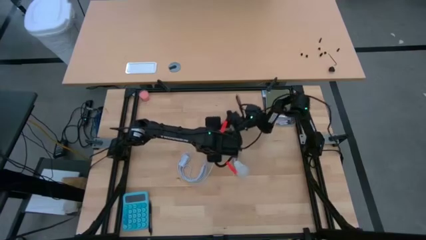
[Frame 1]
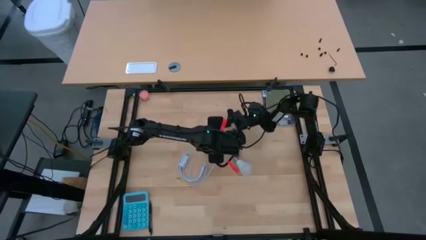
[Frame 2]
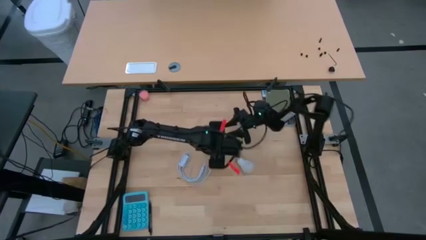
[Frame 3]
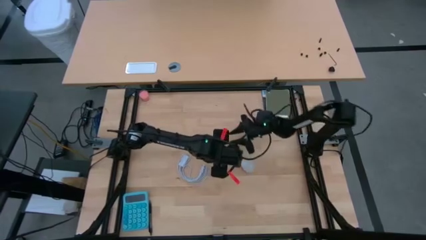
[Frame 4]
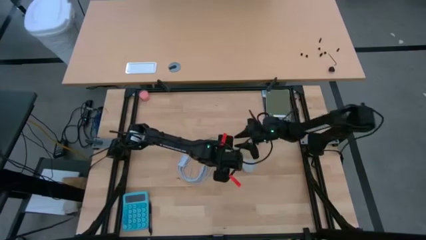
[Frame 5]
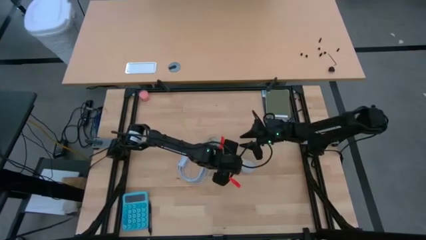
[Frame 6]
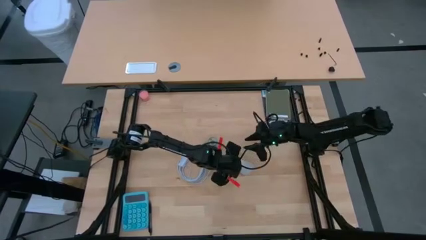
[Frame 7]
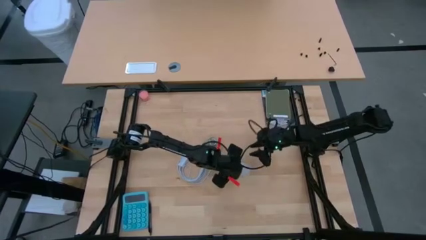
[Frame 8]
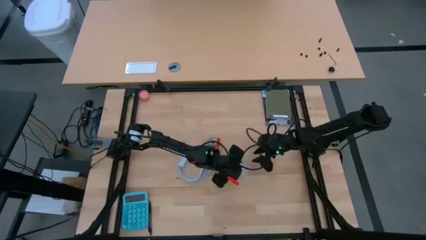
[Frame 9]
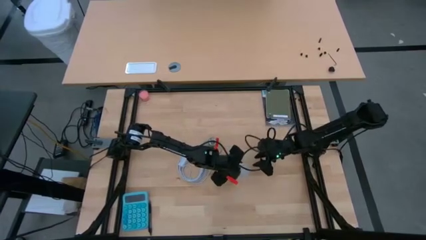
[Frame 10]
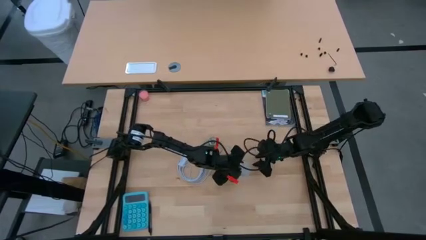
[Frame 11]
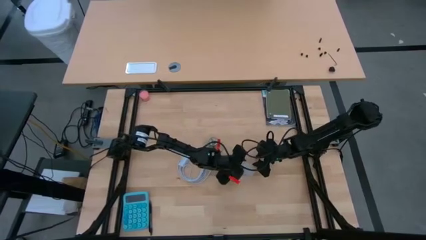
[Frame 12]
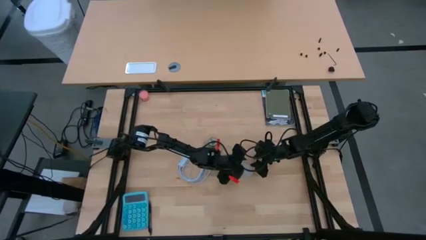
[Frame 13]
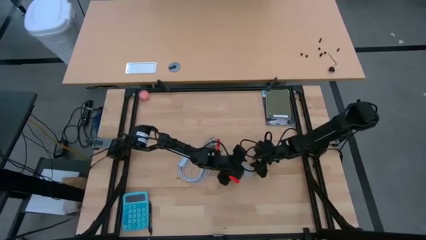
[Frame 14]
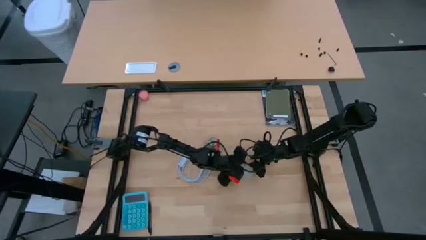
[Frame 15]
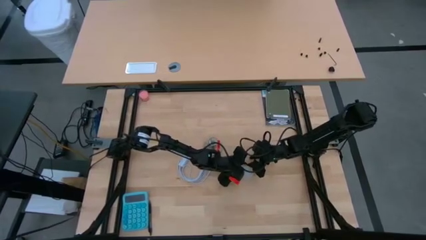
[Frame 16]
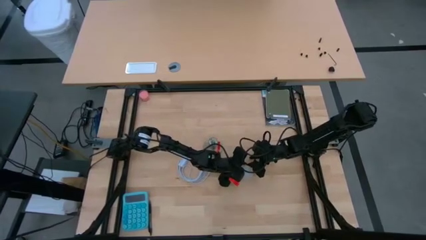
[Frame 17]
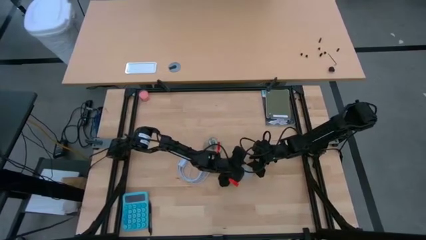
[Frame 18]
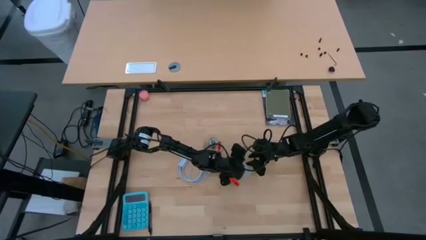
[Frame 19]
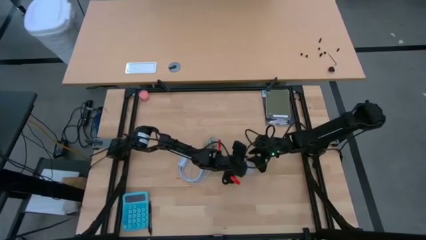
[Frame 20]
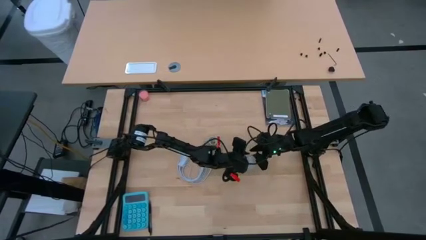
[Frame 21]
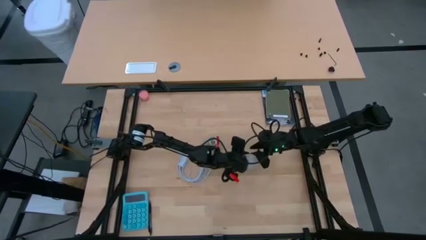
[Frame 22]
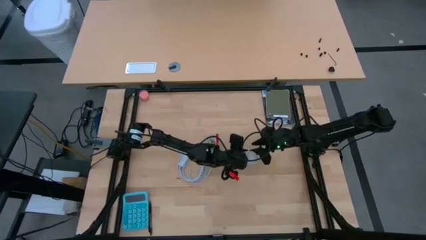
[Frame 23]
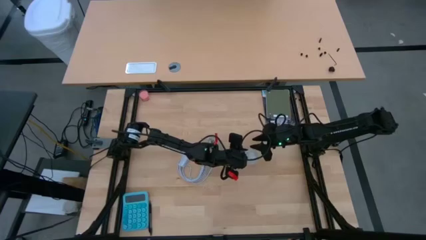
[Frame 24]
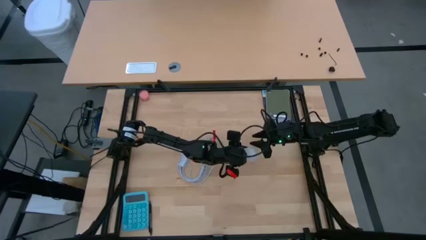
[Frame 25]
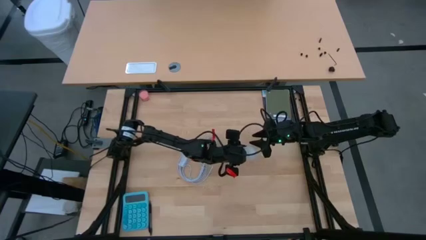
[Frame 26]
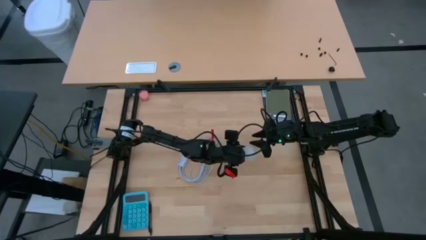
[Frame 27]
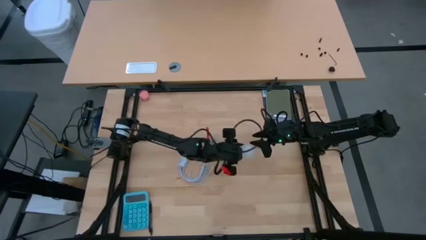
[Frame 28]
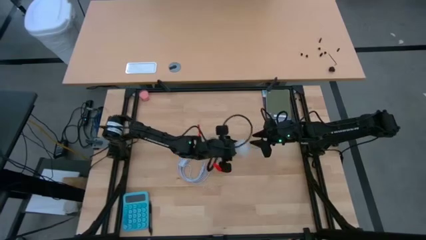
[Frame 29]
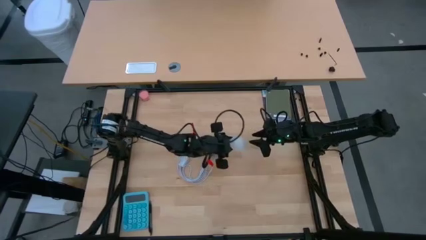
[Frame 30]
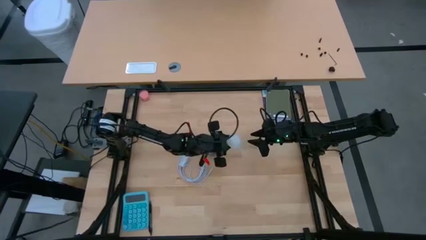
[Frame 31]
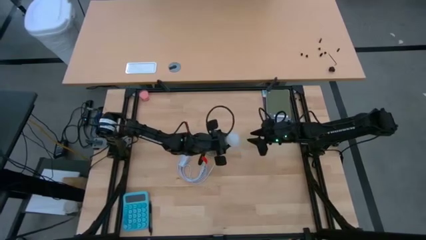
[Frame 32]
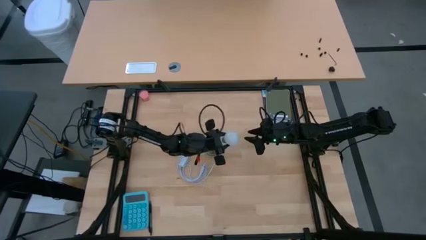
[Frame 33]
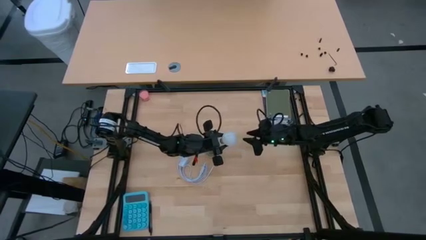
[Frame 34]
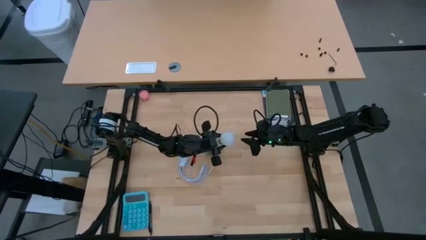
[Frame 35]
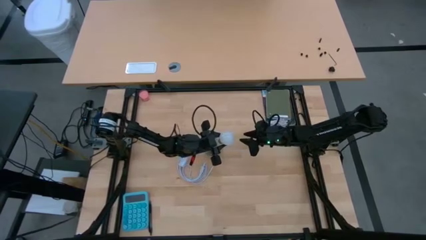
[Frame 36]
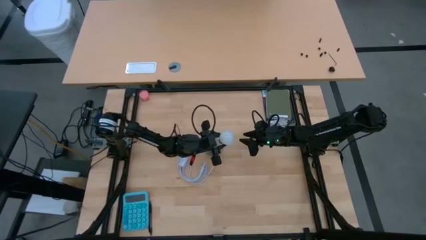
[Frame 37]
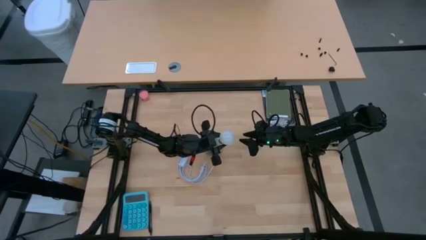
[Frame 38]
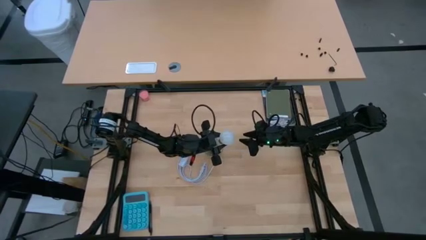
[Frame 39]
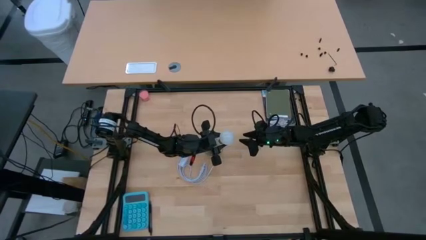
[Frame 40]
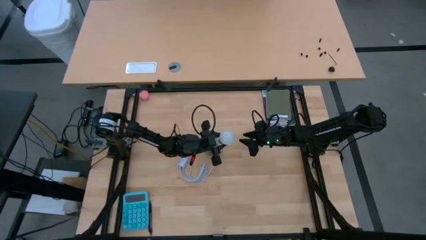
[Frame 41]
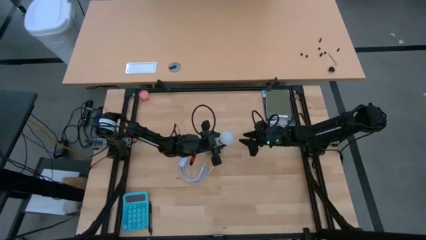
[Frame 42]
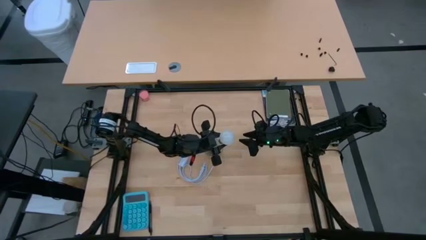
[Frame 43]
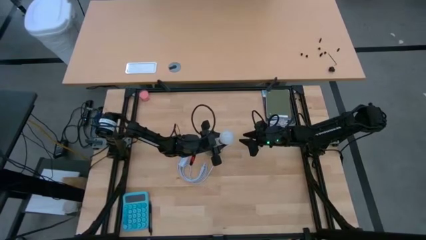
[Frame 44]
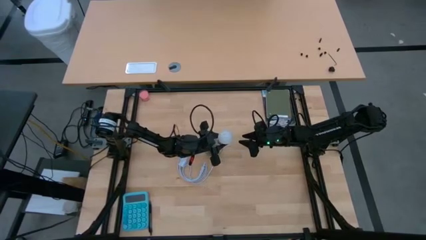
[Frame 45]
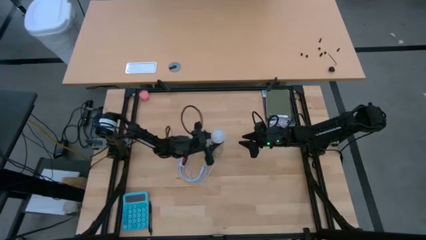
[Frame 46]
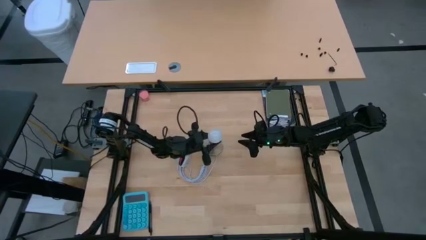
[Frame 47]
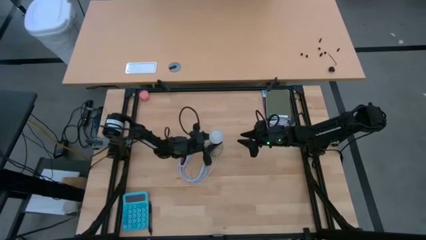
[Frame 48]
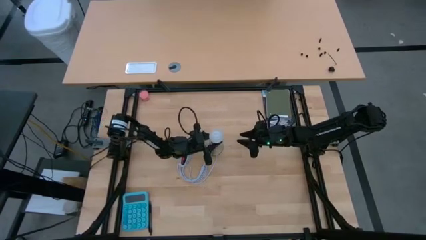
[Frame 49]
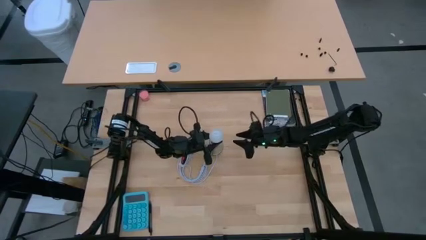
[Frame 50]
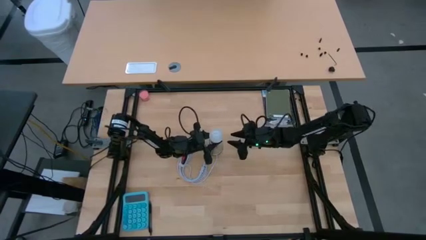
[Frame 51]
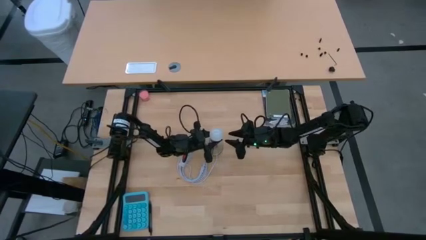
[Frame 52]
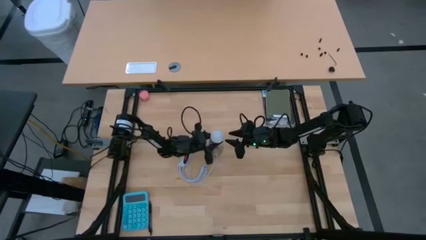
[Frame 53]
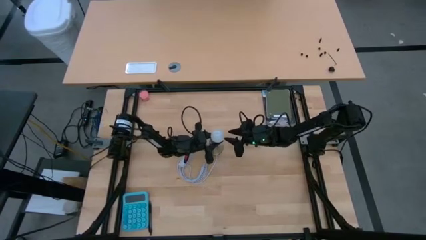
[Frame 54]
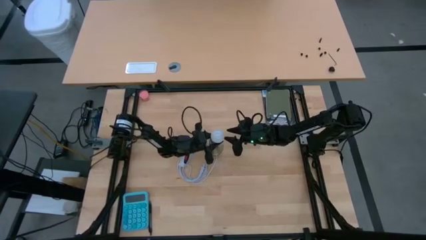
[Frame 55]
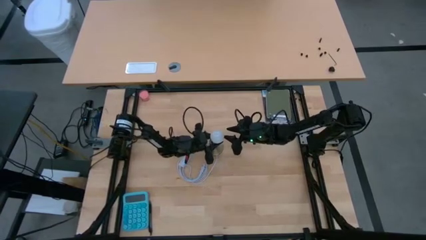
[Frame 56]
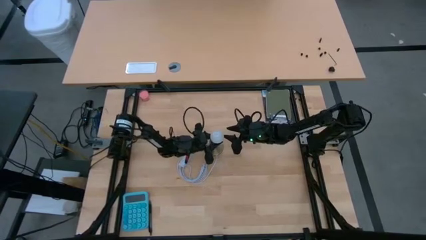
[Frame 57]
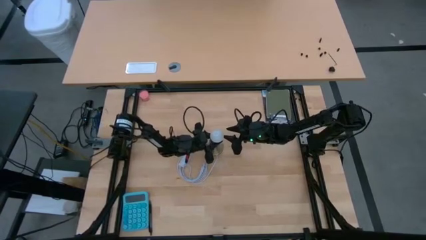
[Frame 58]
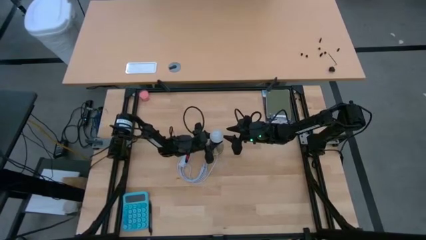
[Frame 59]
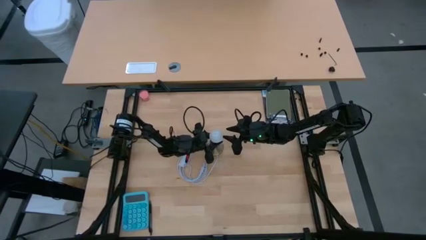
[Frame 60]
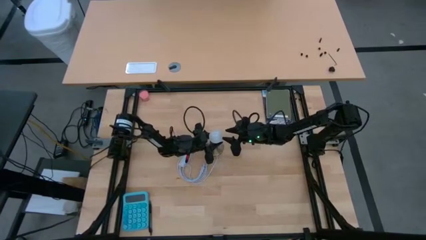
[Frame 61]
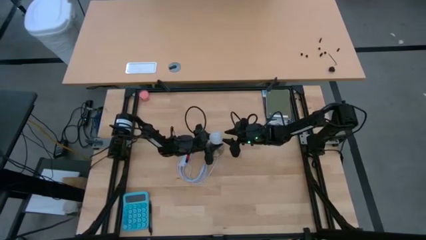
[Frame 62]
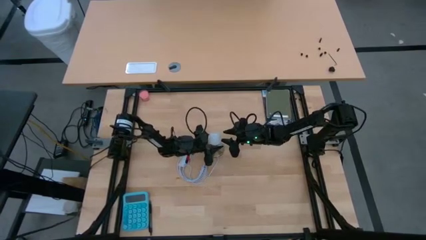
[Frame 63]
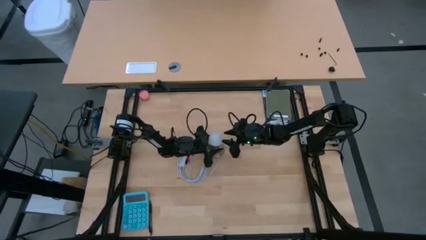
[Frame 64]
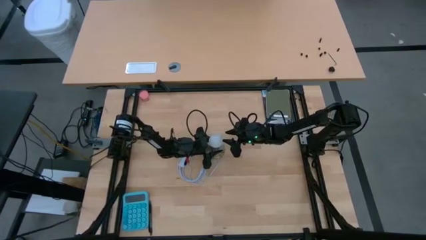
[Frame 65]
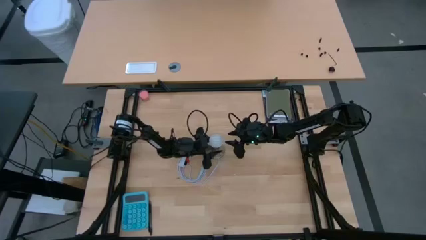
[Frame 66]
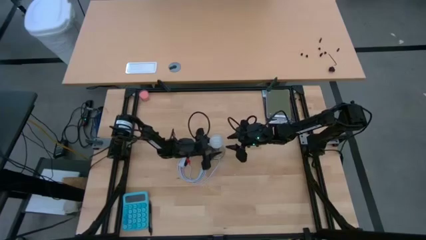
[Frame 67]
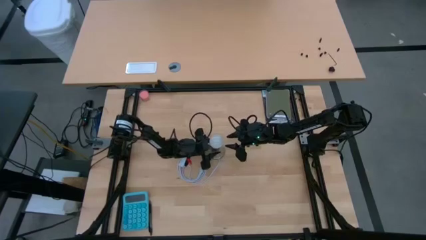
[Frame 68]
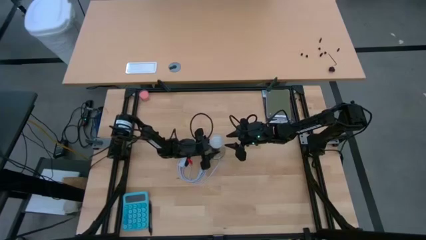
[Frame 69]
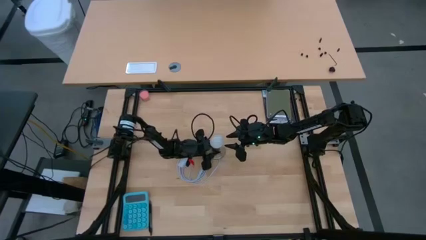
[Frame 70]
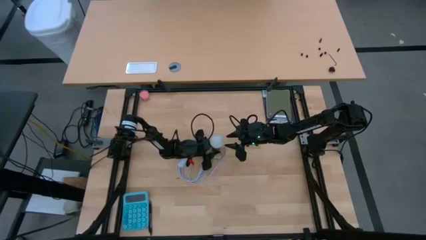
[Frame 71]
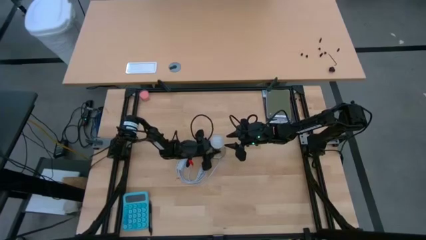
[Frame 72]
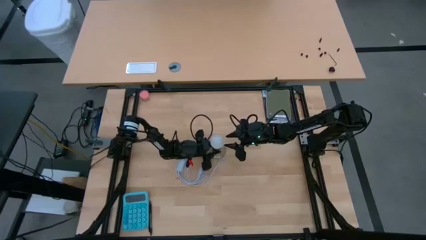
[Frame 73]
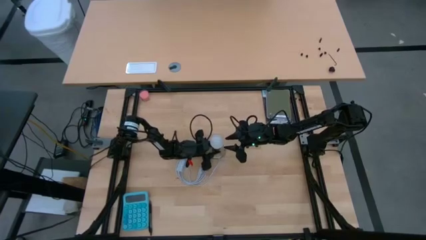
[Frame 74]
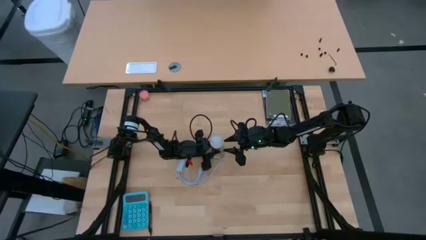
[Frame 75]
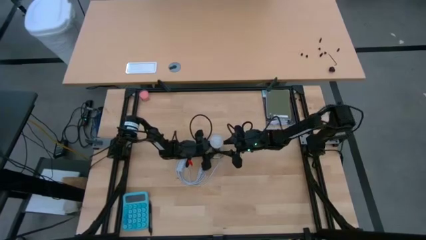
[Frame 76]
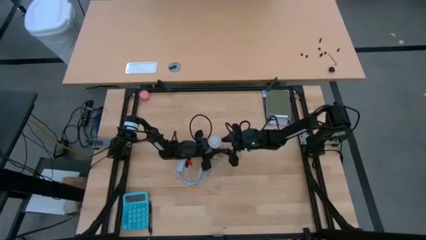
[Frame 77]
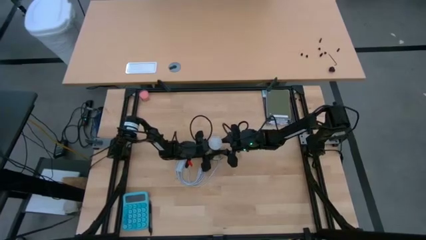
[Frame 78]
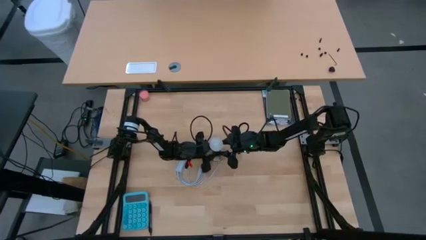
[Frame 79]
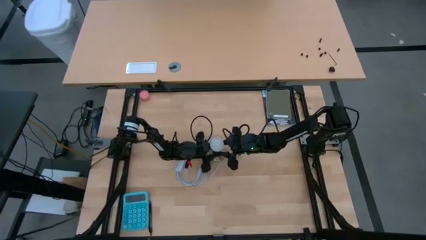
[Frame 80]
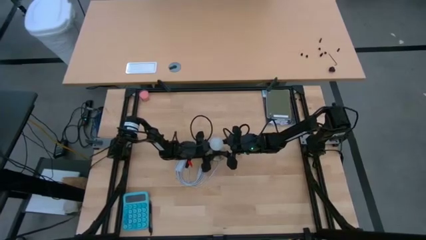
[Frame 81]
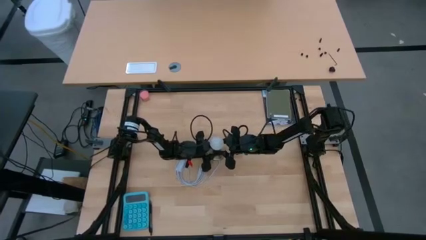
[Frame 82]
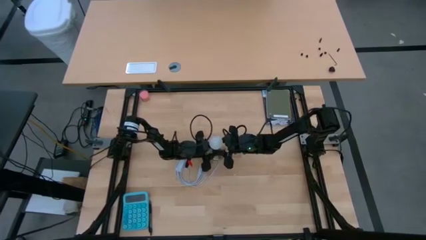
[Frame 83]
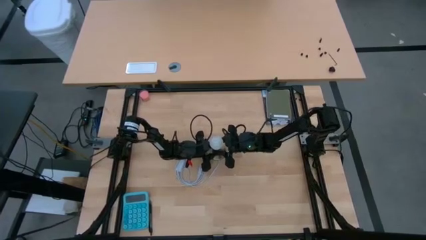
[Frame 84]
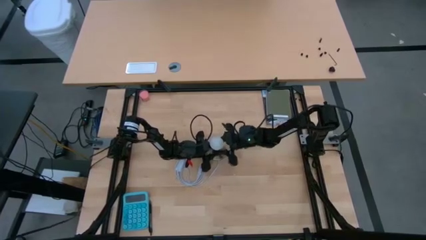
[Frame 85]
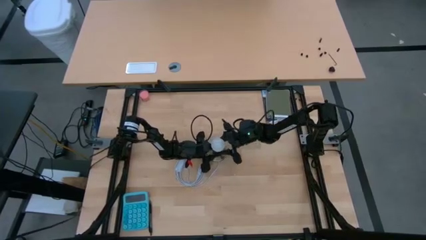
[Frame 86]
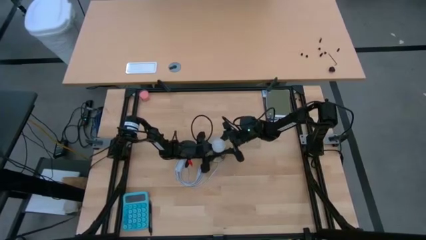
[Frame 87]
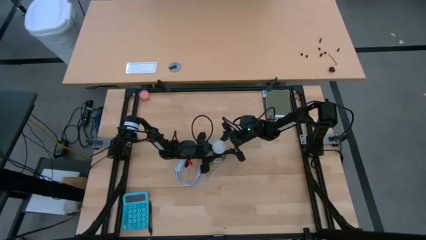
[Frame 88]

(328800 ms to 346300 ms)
Task: Screw lightbulb
Insert the lightbulb into the lamp holder
